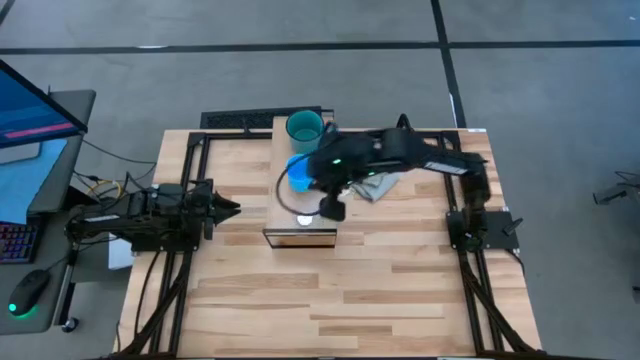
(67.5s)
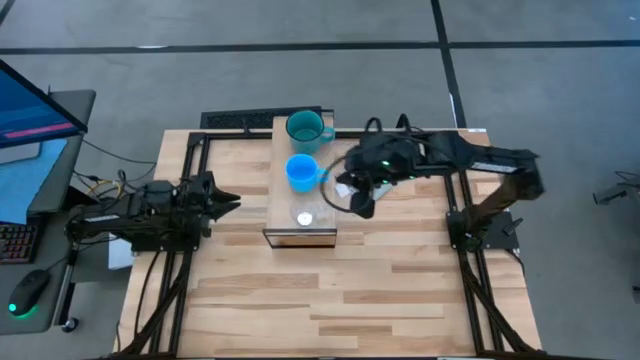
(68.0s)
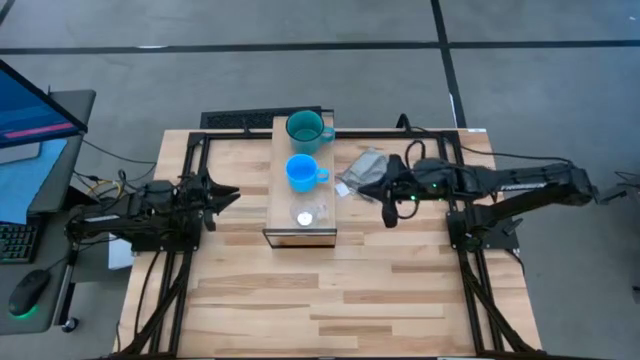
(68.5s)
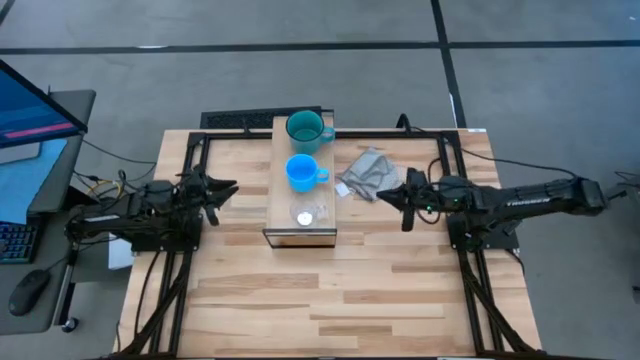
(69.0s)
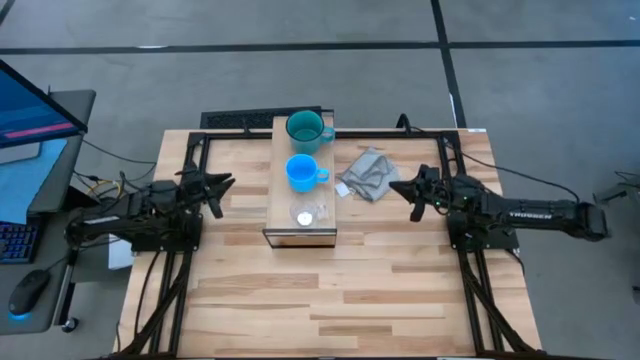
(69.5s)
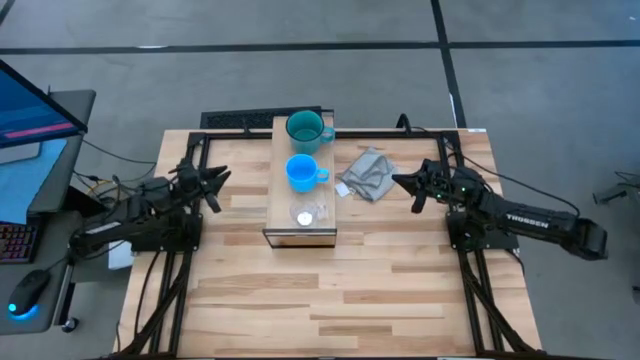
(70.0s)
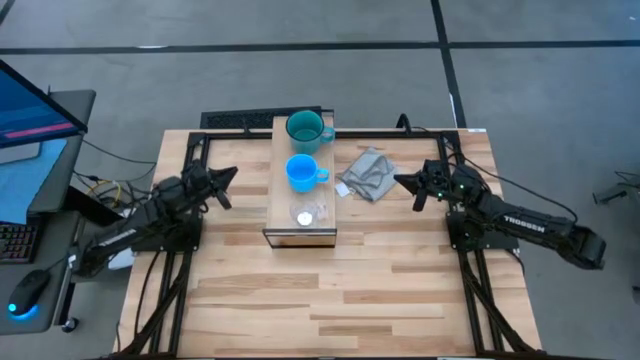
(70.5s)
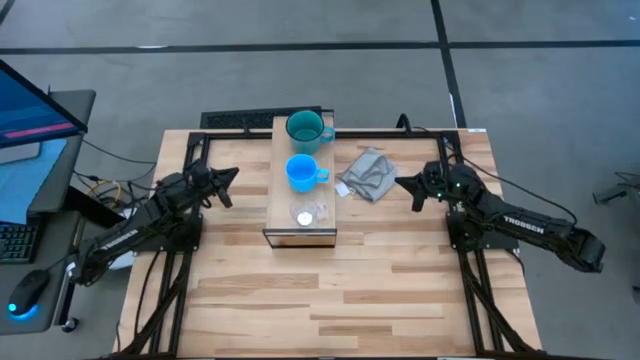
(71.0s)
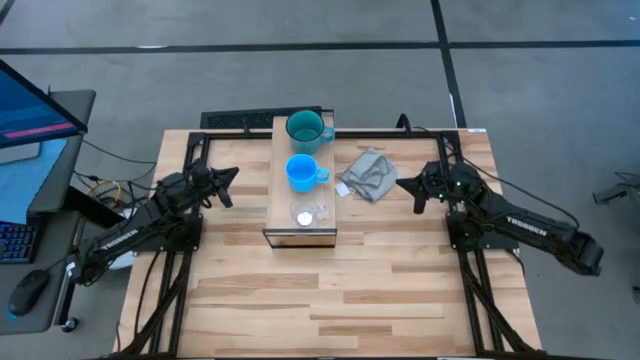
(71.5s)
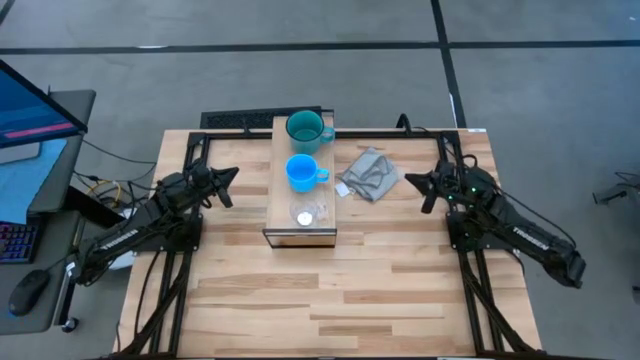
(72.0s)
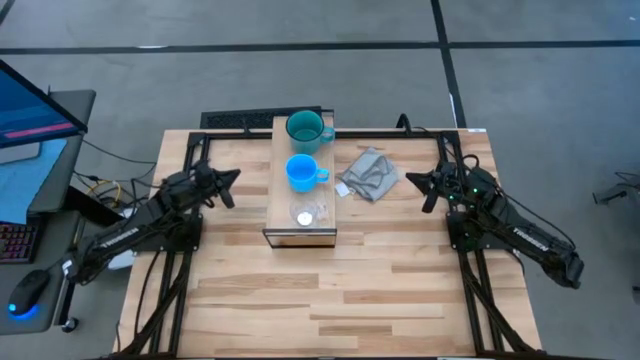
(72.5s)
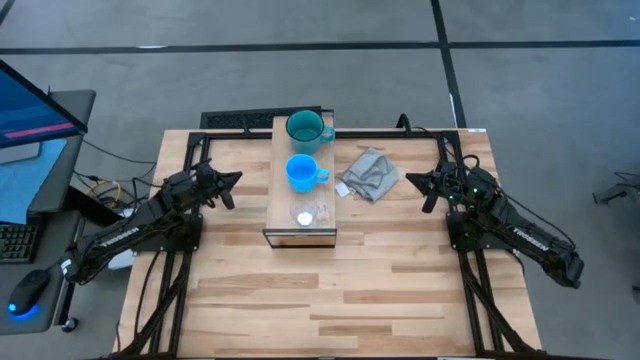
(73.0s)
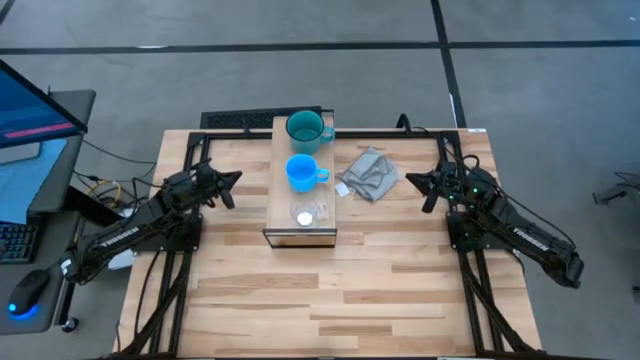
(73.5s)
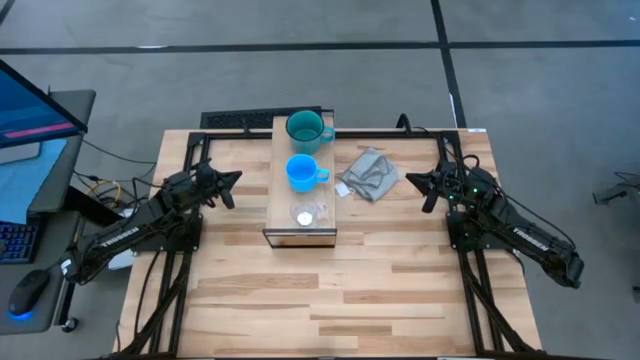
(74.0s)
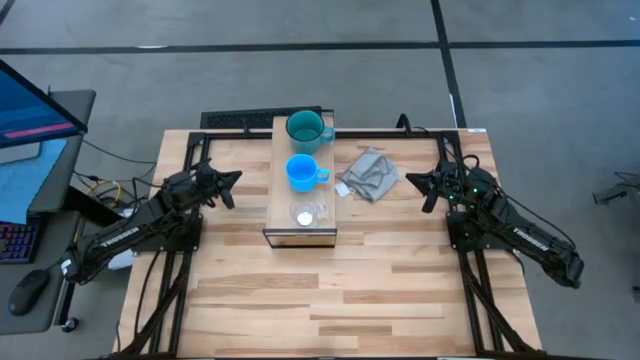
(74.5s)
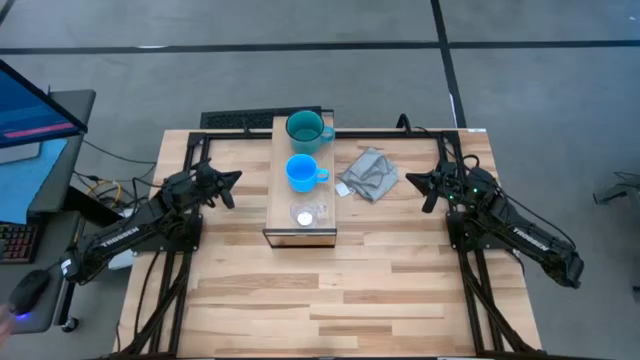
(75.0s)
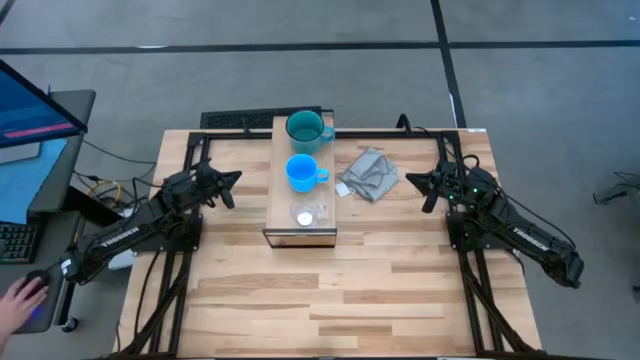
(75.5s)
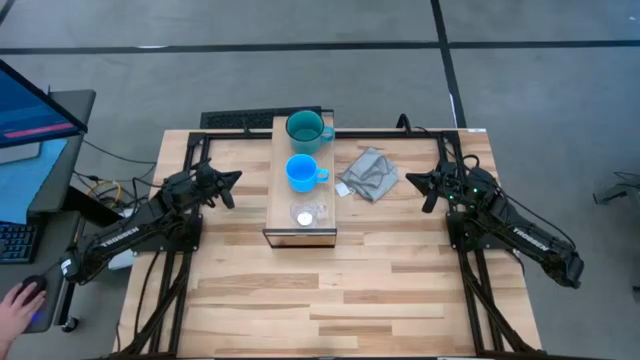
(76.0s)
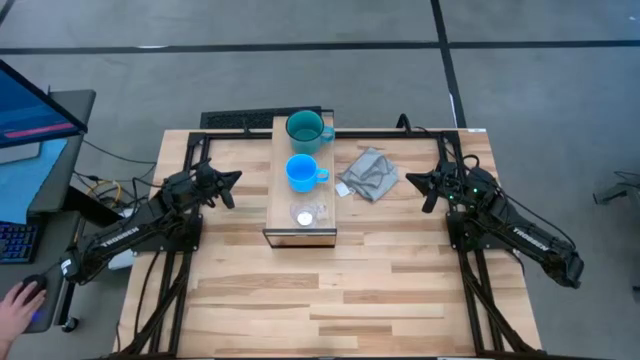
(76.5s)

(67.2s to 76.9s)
Task: Stack small to large cups/mugs on shelf
Return to Home Position

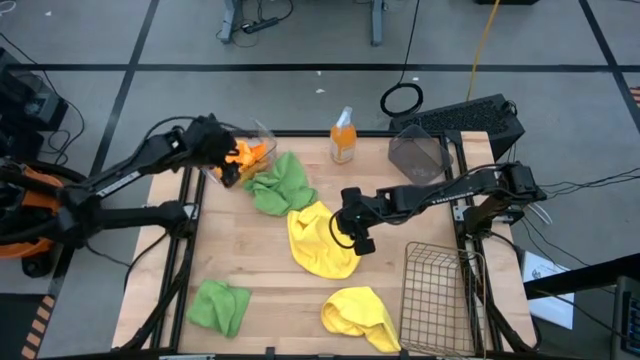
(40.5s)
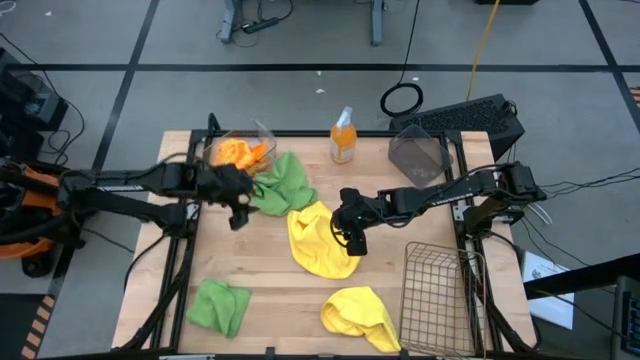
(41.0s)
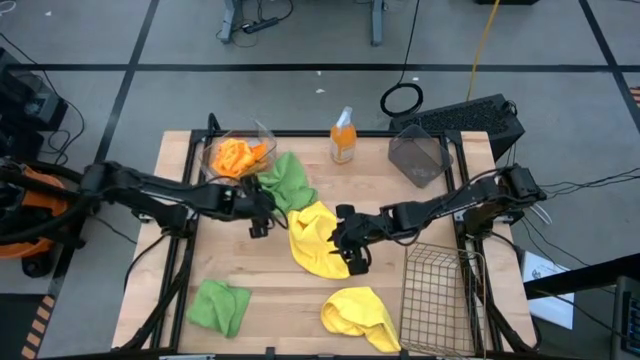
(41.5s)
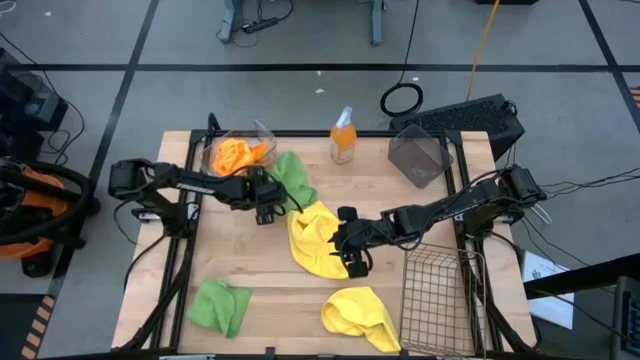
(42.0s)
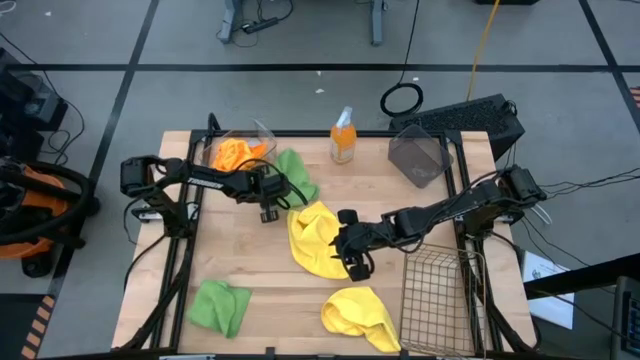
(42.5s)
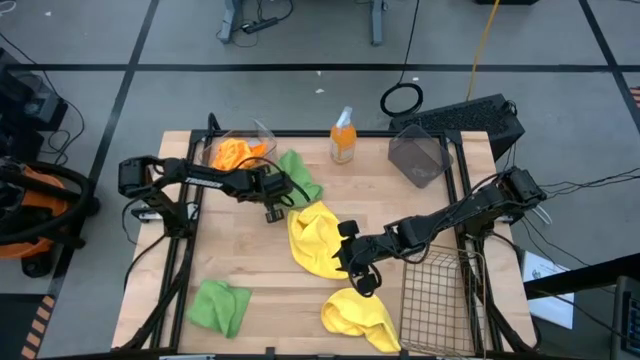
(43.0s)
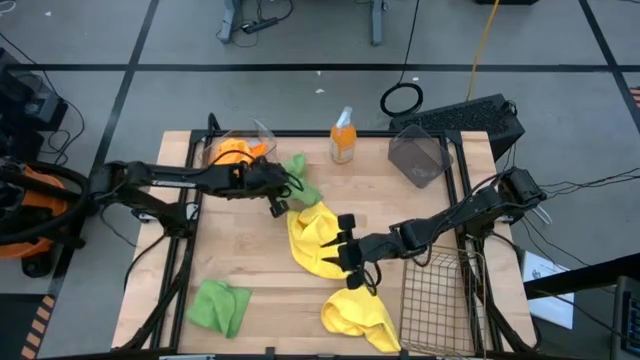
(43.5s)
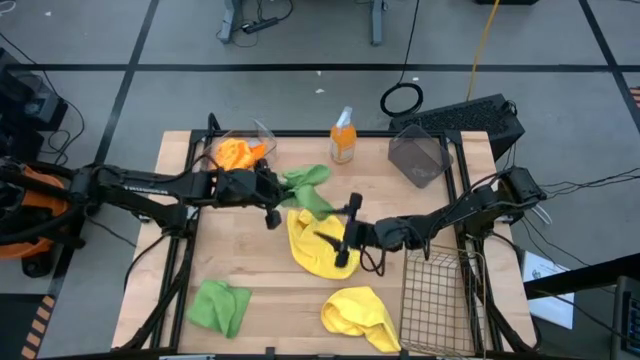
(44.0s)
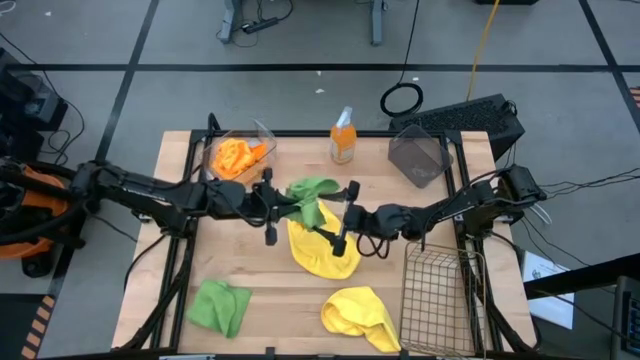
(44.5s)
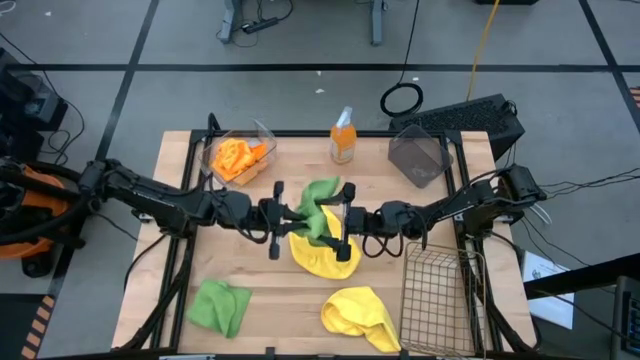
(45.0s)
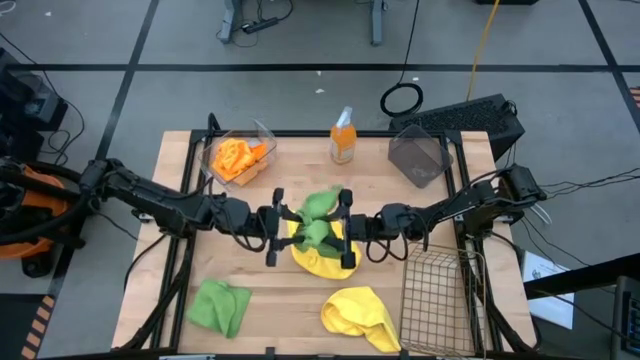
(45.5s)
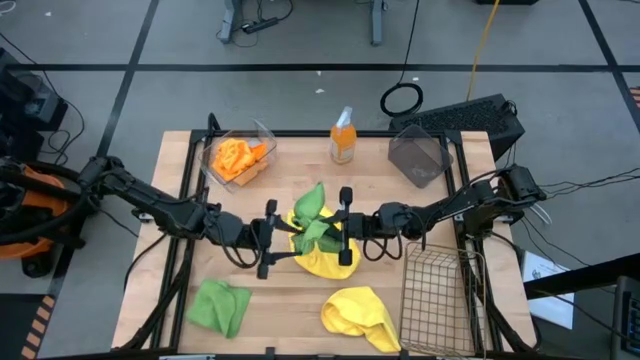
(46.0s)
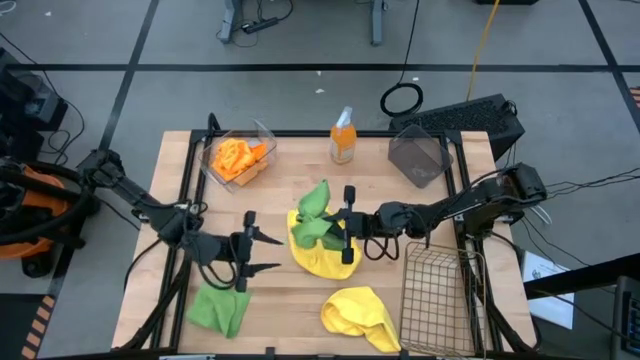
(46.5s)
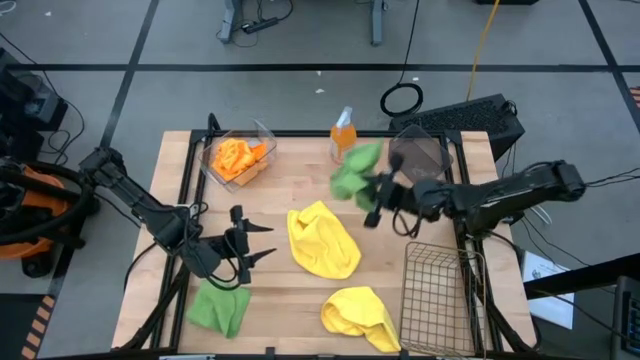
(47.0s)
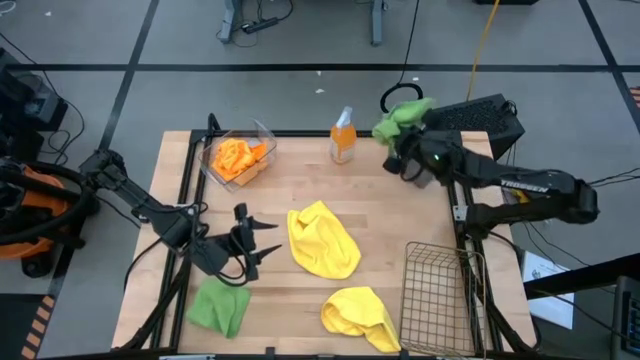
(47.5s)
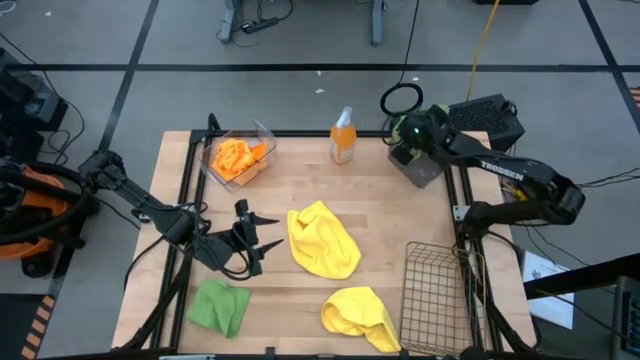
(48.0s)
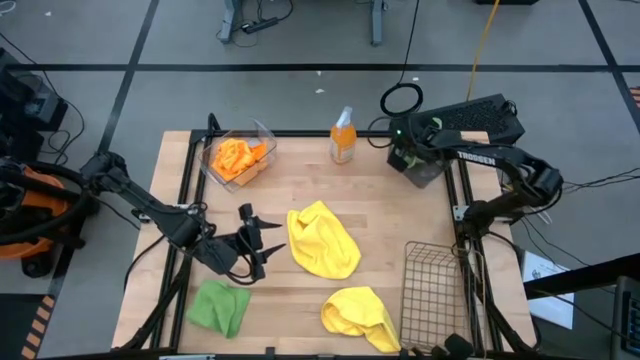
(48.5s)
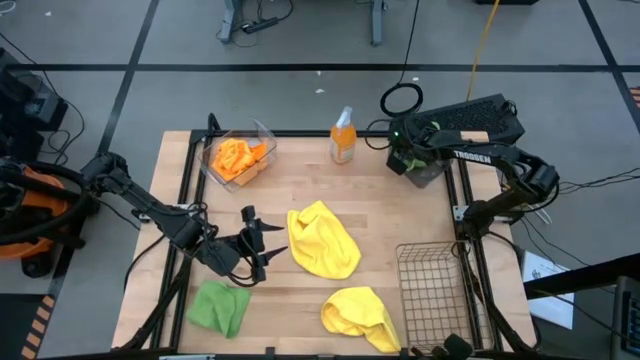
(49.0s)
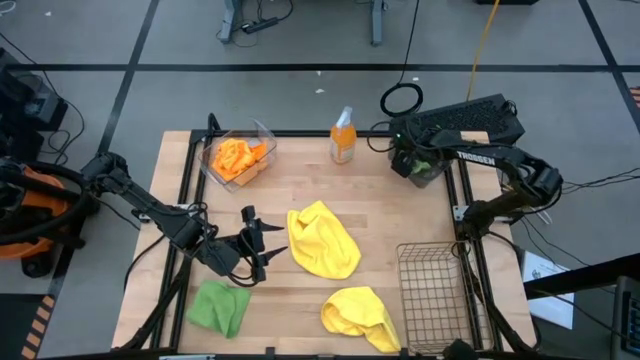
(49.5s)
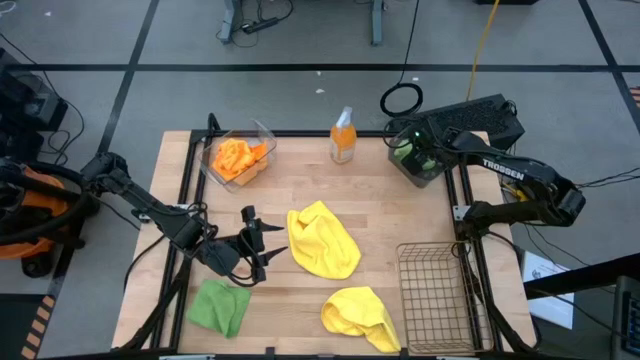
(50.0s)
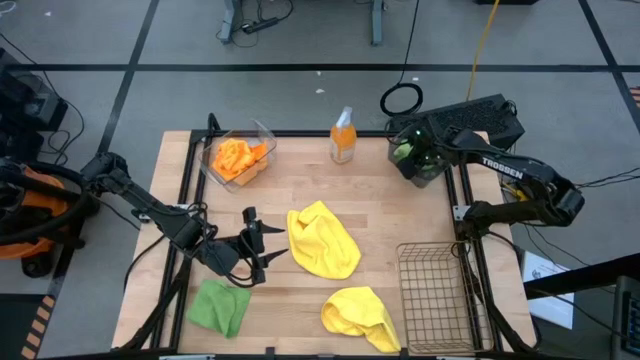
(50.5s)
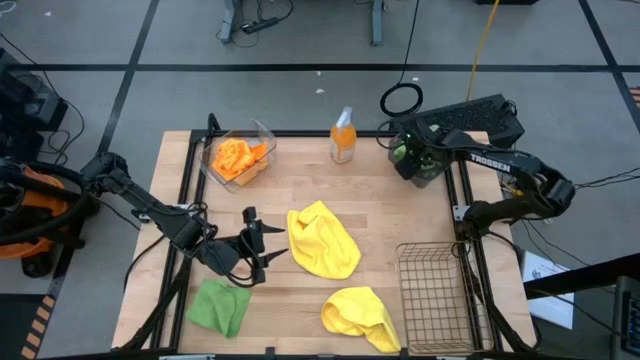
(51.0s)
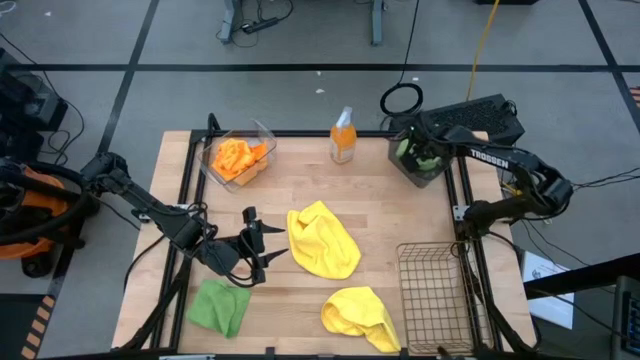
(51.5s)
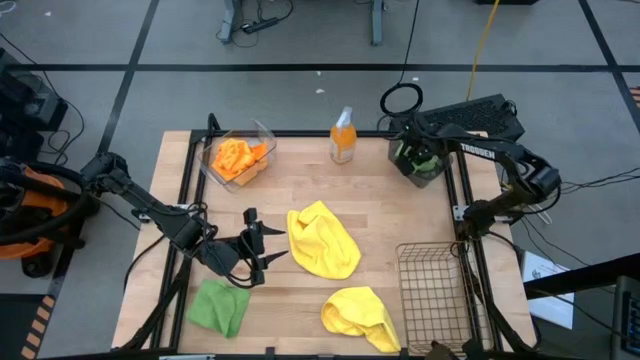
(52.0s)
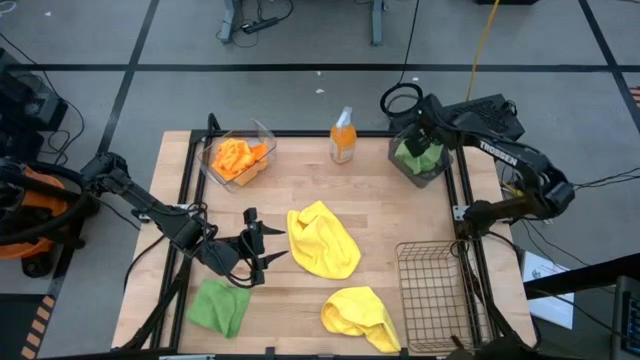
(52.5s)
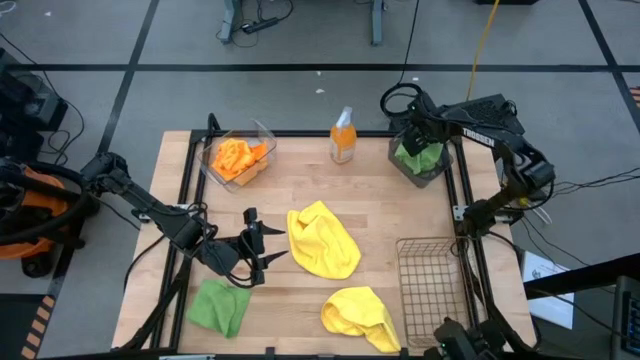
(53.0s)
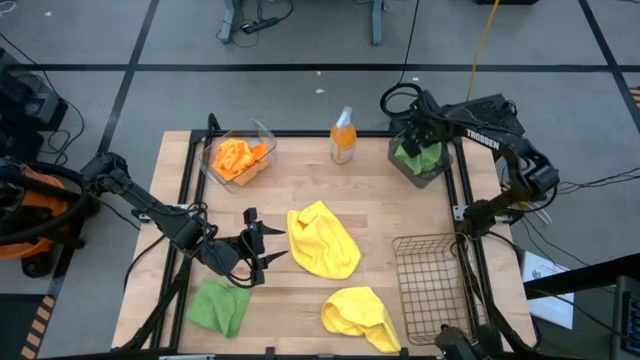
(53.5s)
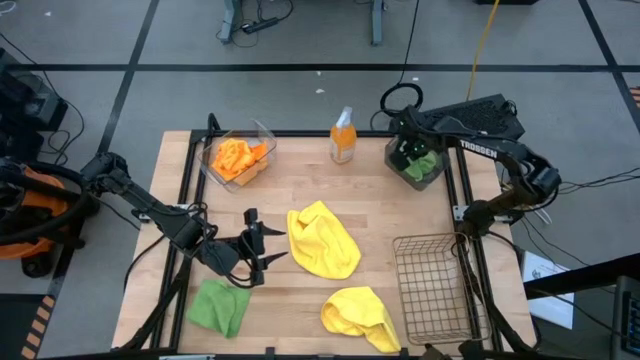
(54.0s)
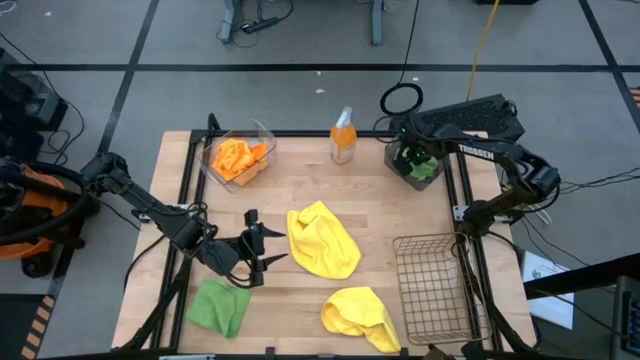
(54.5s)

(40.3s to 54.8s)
Task: Sort microfiber towel by color & place in baskets
Put the top green microfiber cloth into the black bin
